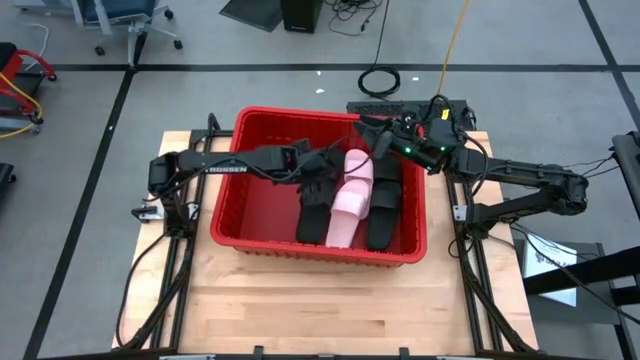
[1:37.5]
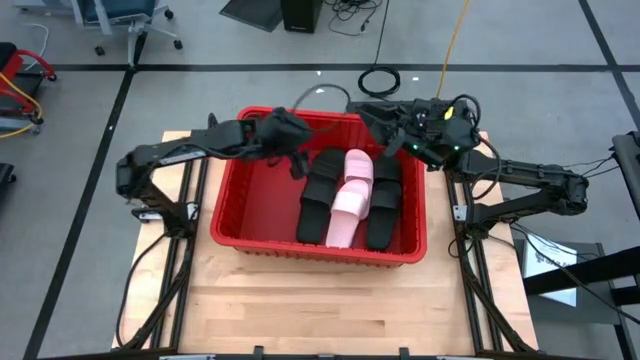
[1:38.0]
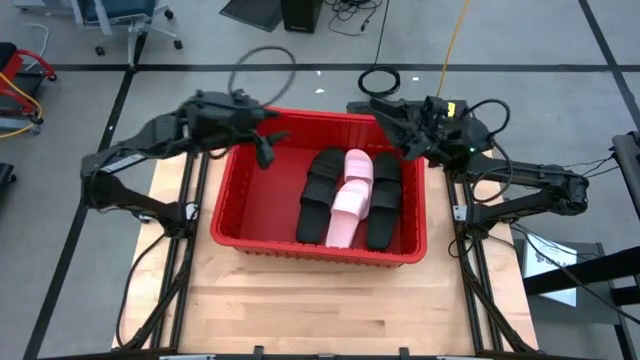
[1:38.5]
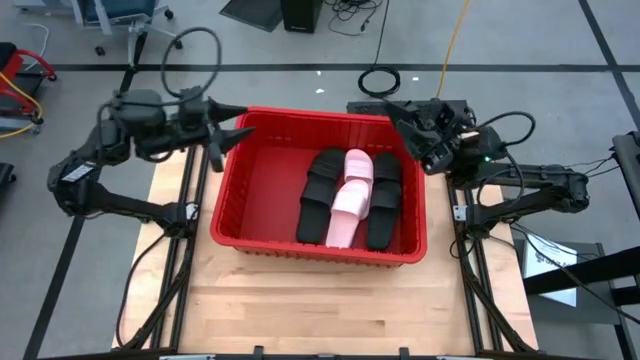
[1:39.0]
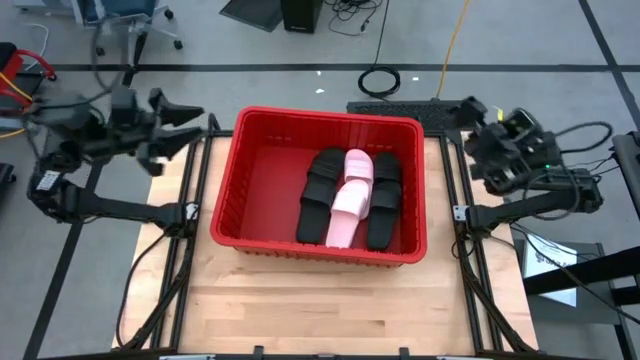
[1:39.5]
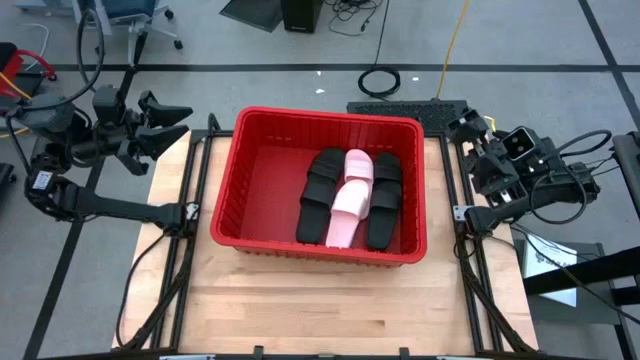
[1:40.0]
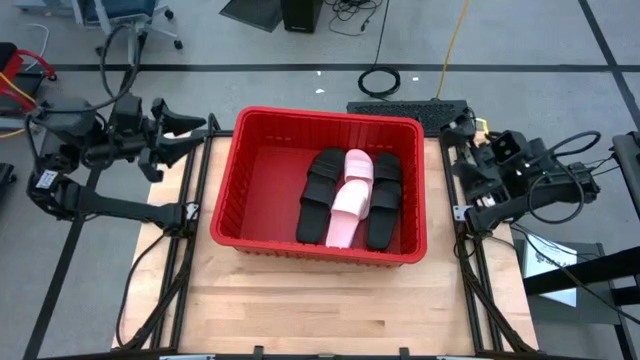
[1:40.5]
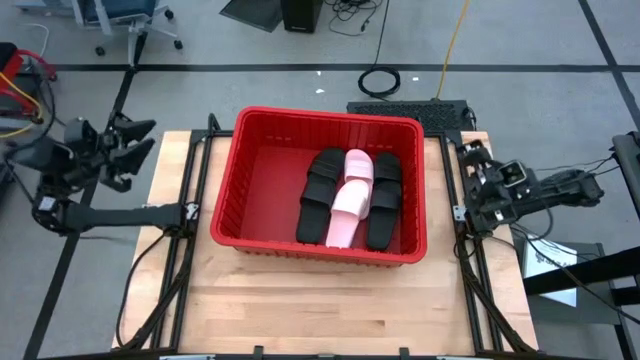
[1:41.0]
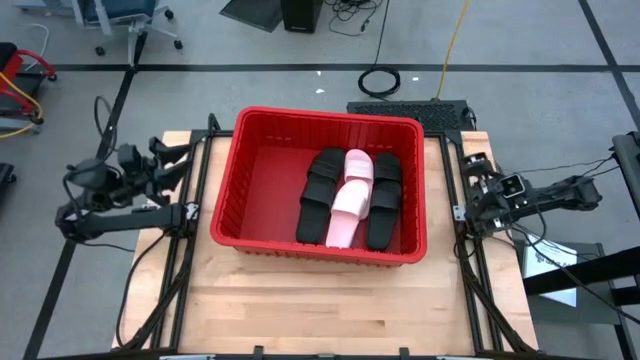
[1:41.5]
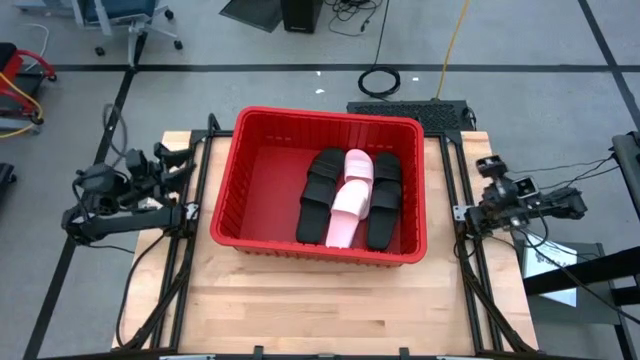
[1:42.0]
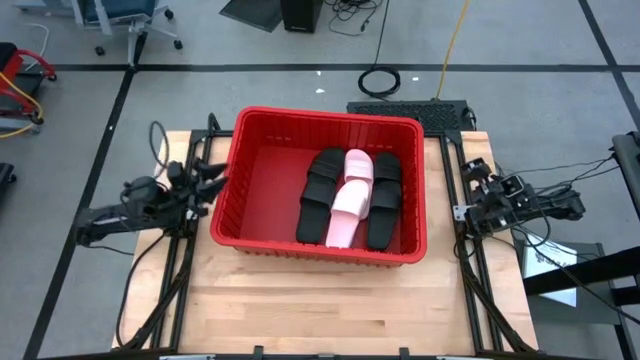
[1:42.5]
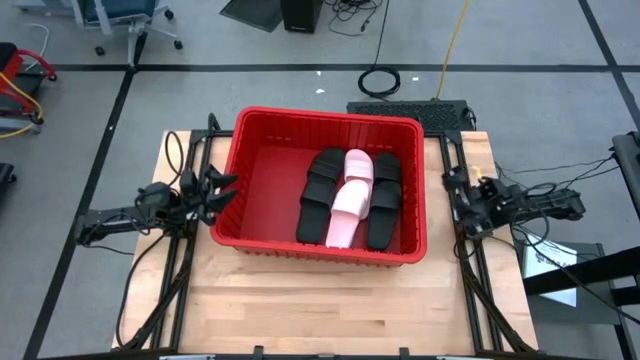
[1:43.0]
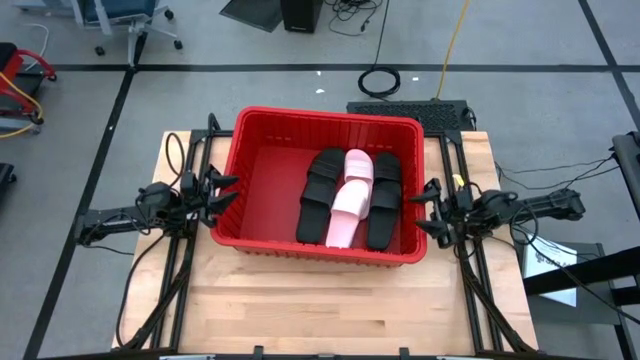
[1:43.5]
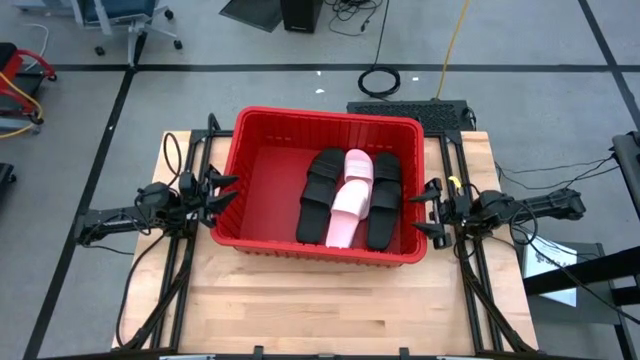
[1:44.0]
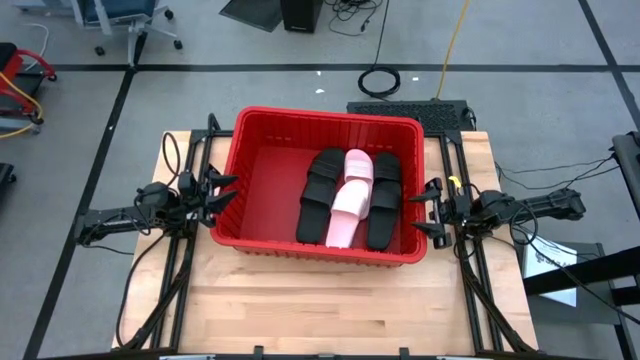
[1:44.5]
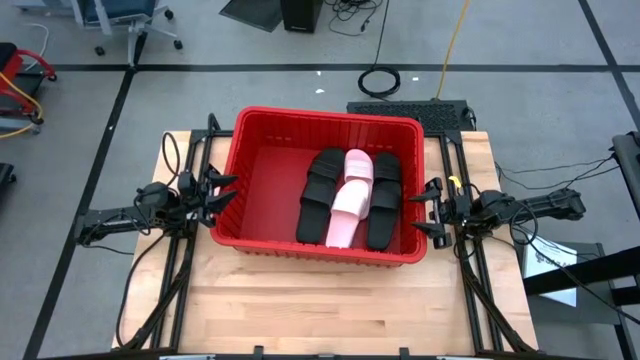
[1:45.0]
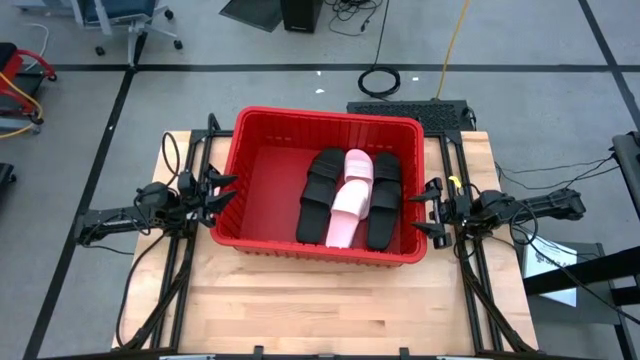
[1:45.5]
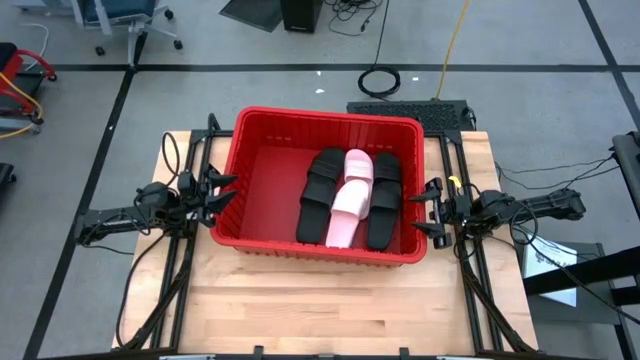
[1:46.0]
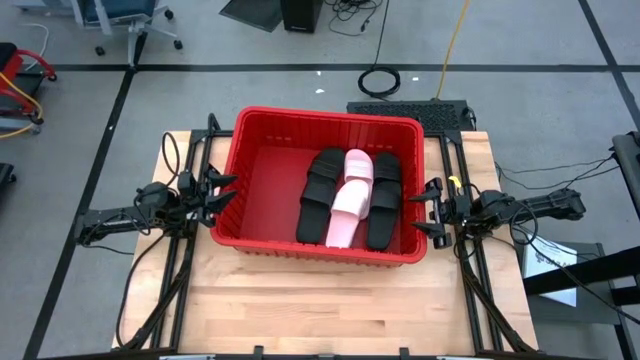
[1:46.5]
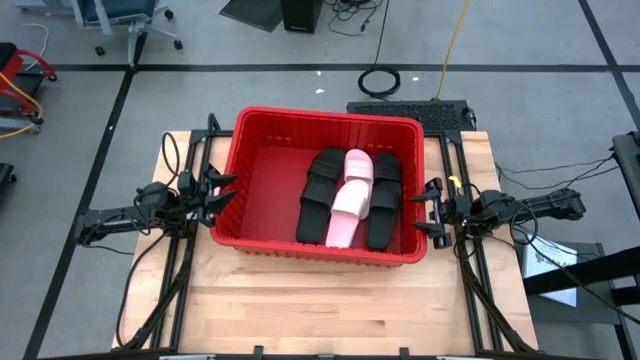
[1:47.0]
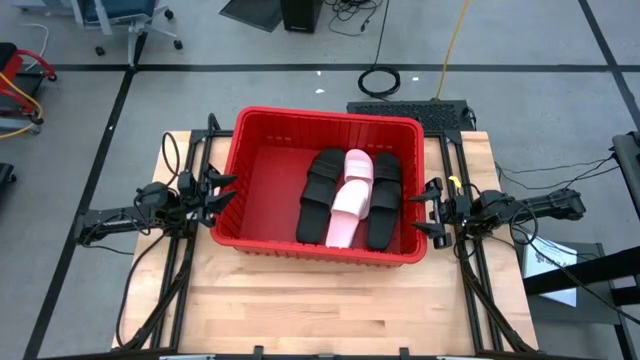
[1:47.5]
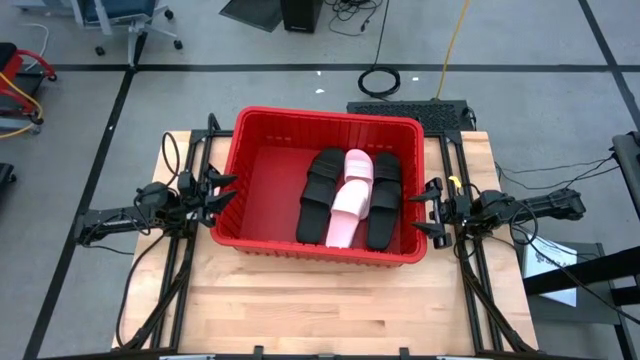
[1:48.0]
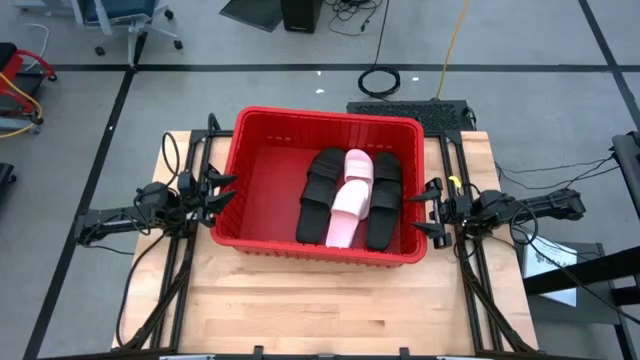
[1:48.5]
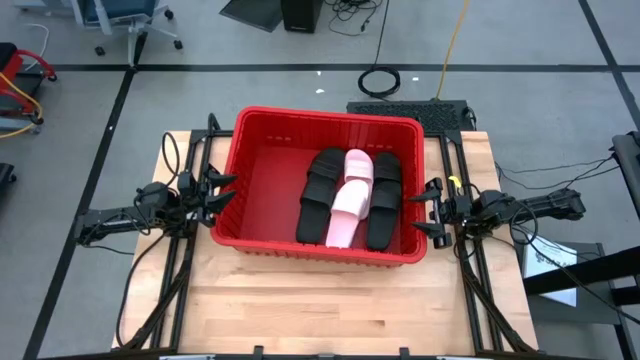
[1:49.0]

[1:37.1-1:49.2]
Task: Pick and place slides into bin
Return to Home Position

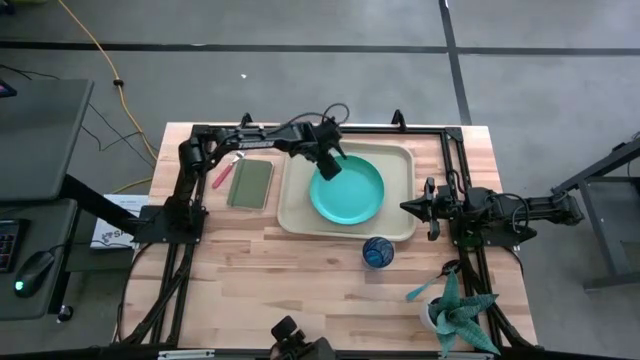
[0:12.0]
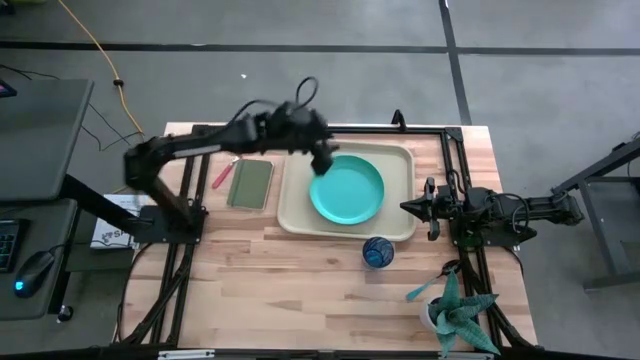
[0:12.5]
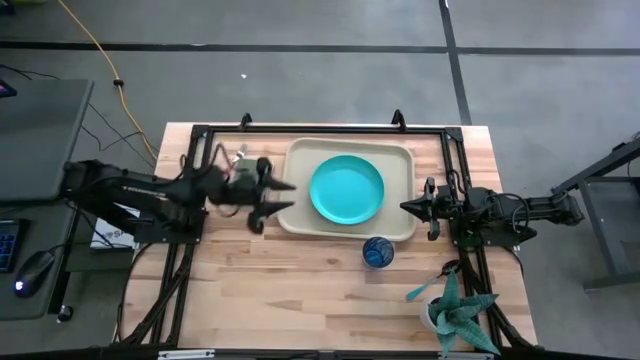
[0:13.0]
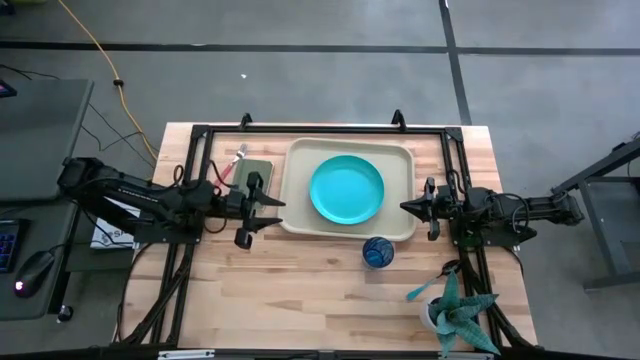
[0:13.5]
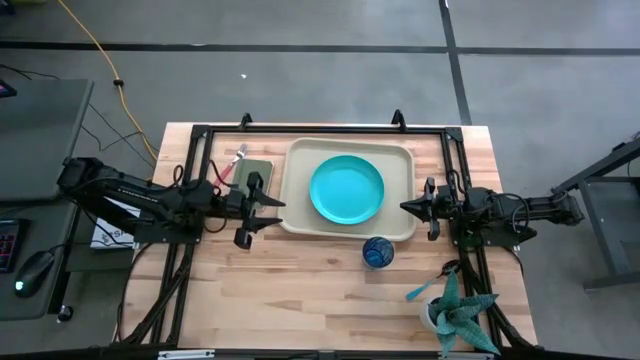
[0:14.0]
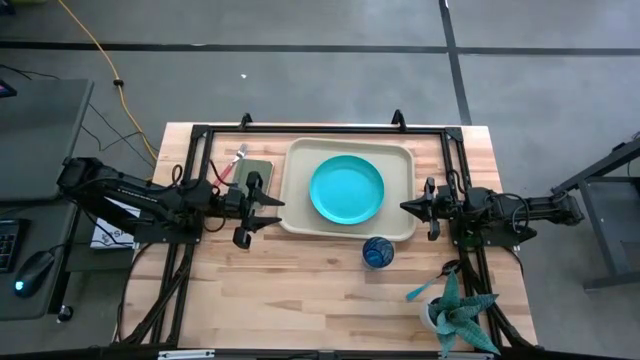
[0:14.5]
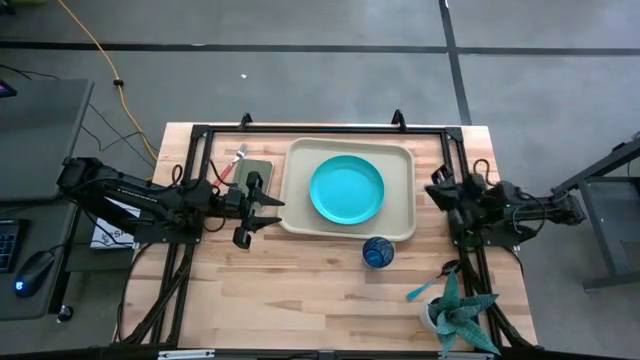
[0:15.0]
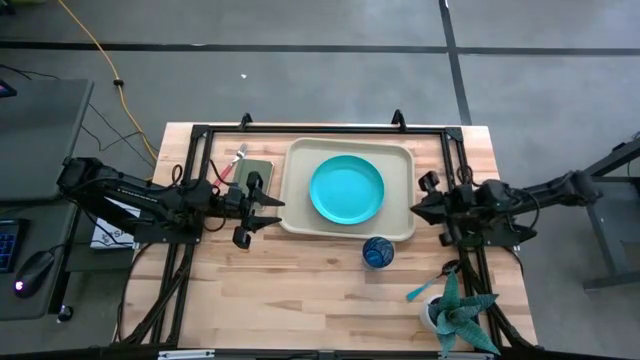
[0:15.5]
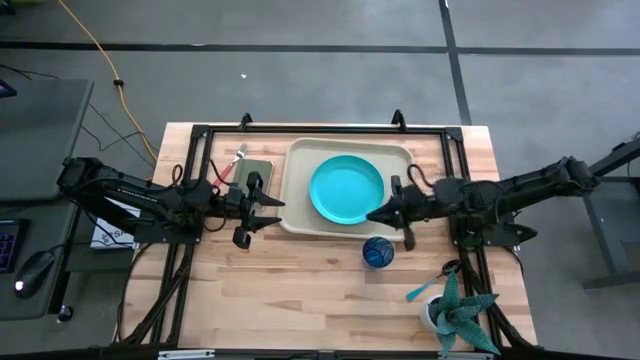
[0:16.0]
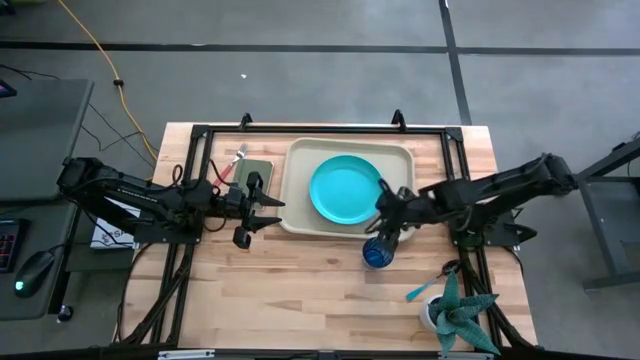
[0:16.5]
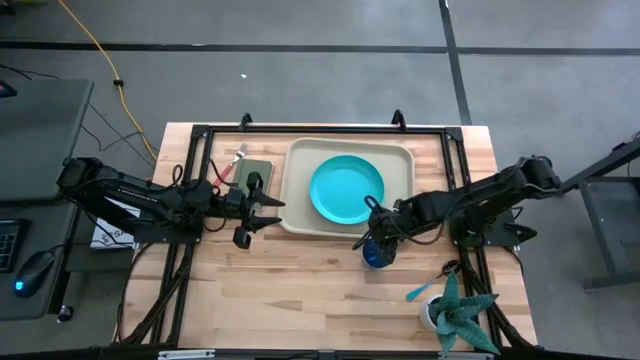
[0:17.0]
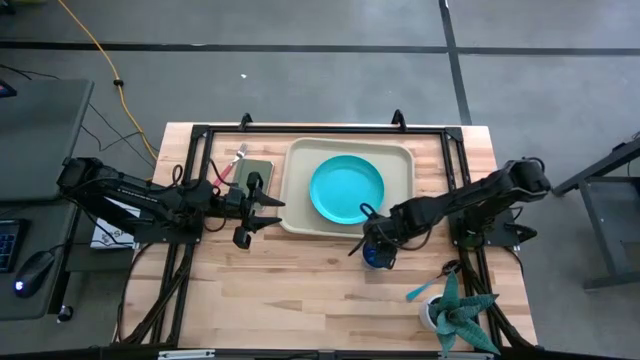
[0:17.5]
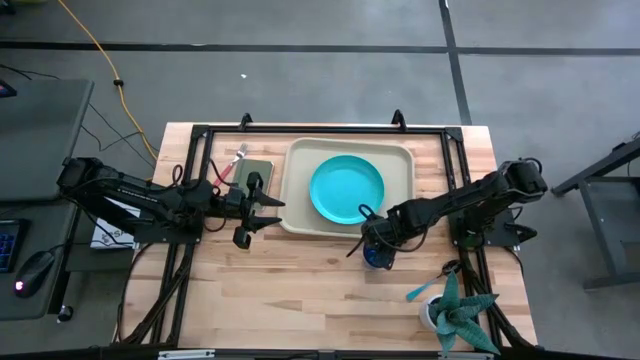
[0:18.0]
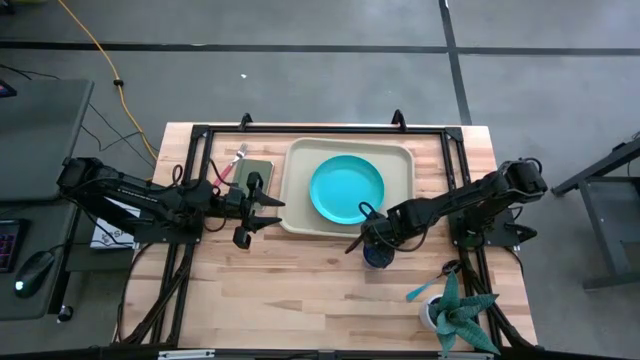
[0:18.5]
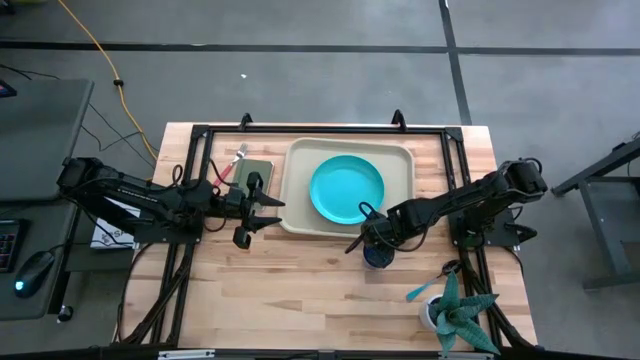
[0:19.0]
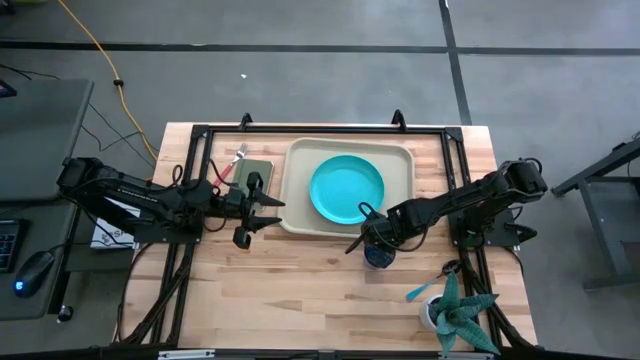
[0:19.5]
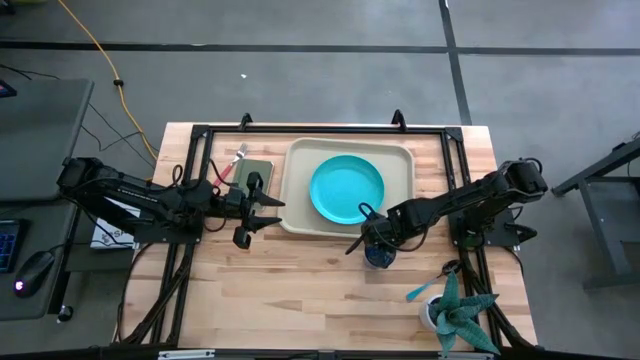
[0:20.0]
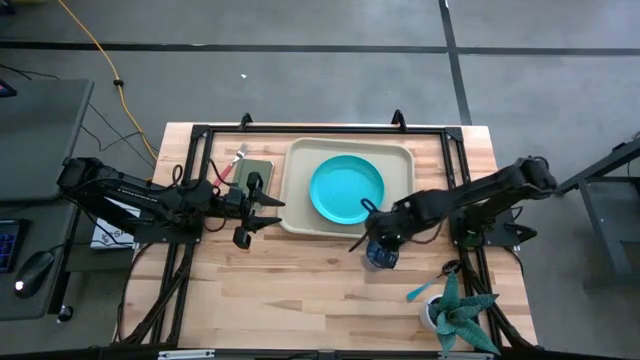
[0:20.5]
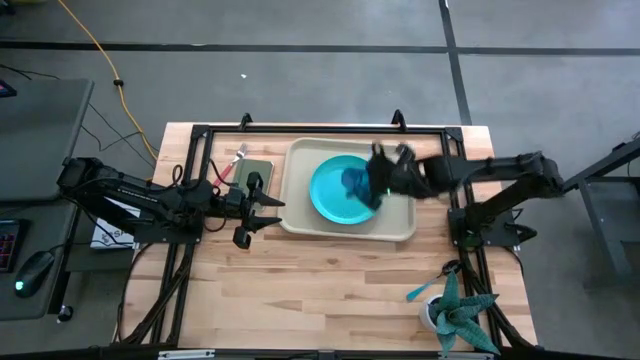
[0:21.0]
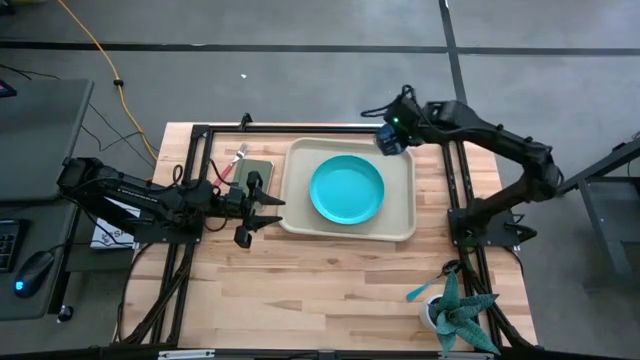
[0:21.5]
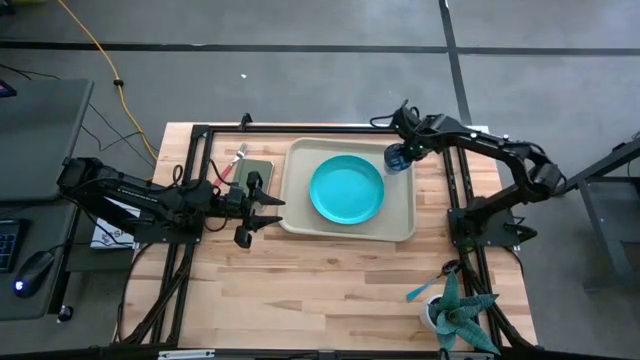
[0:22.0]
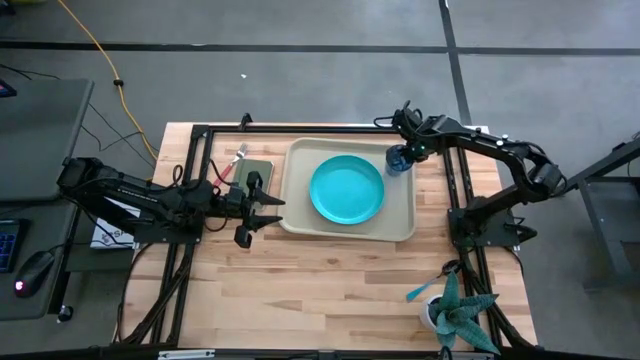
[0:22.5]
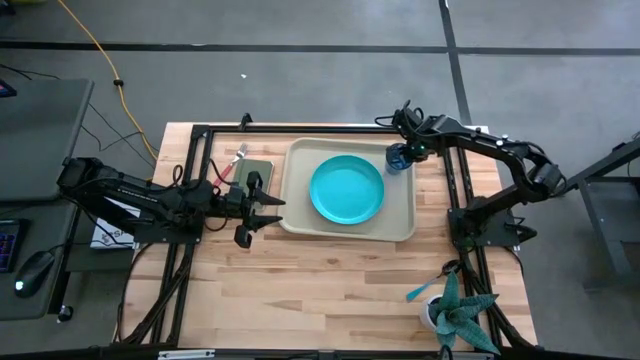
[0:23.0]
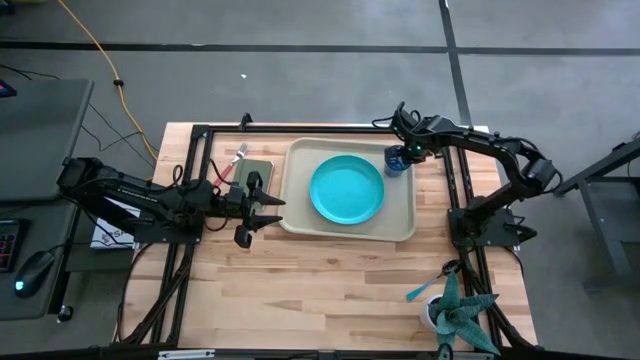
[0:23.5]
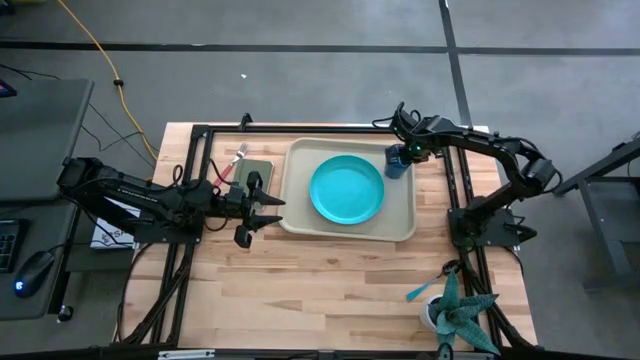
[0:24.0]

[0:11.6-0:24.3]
Task: Pick and place plate/cup/fork/spoon on tray
Put the blue cup on the gray table tray to the top right of the light blue plate
